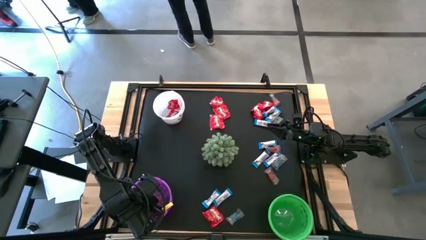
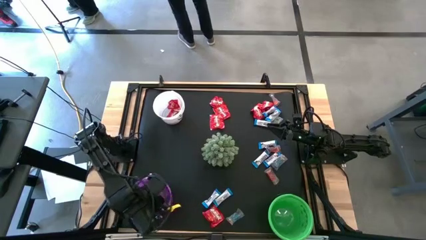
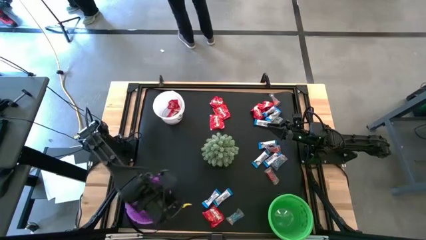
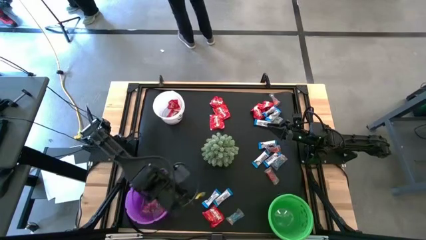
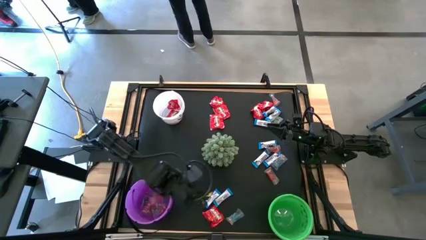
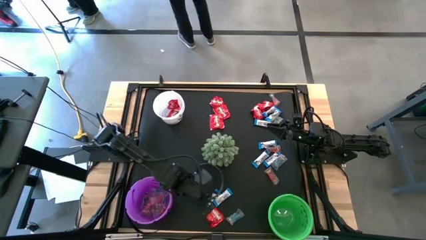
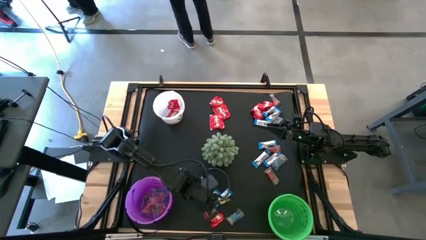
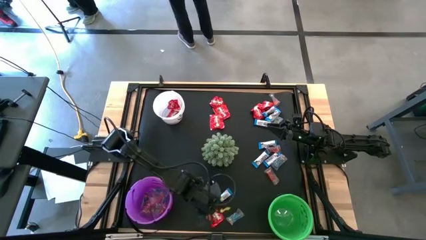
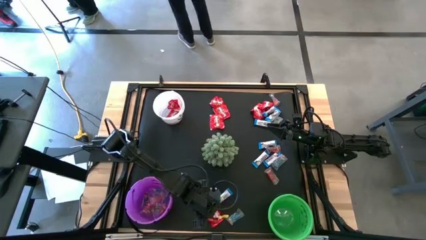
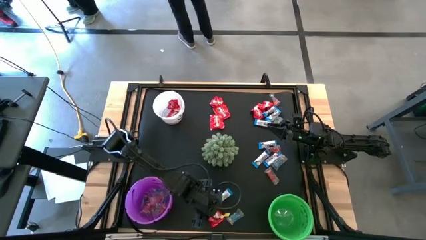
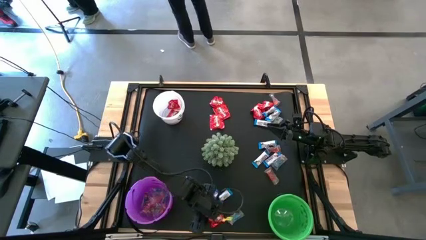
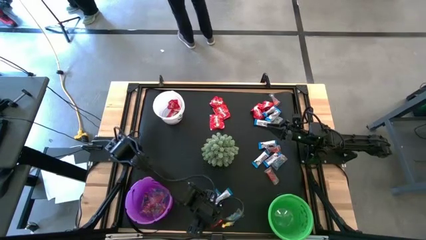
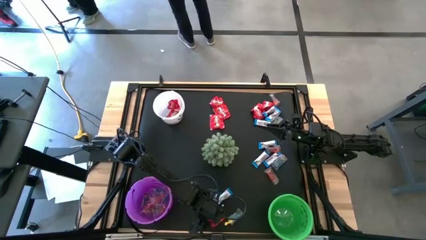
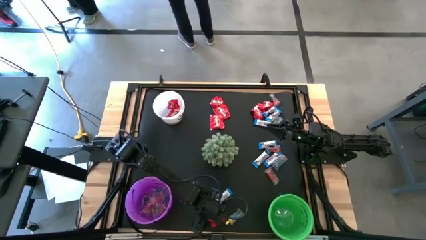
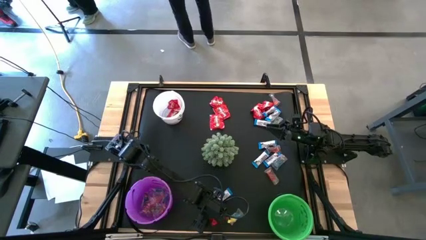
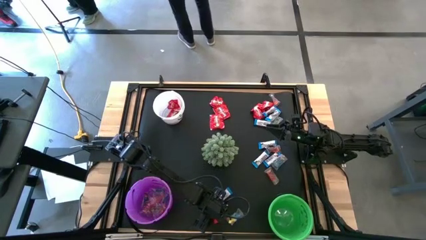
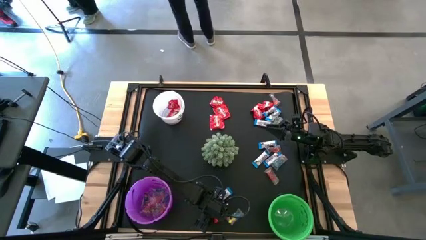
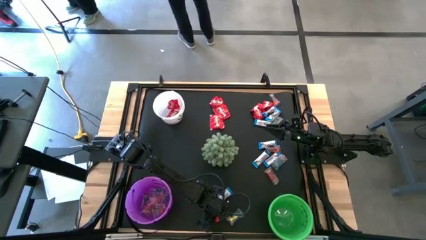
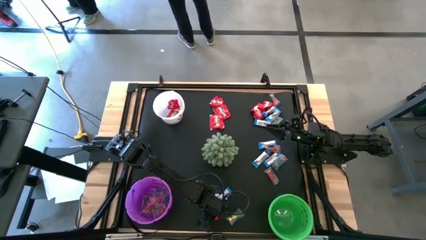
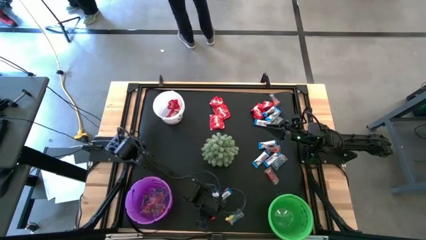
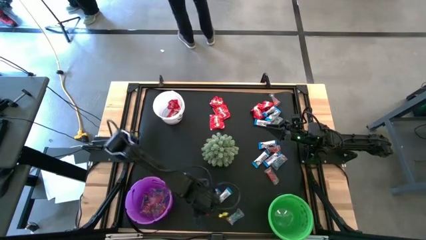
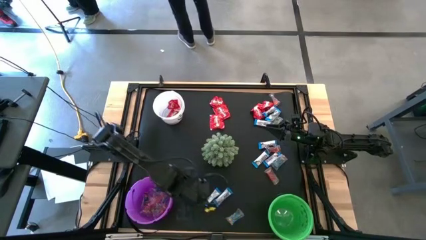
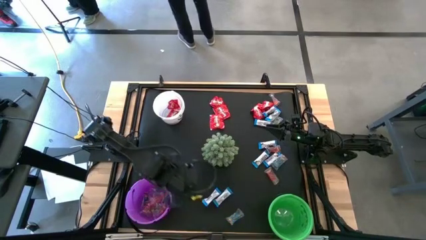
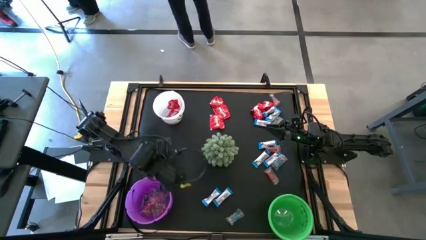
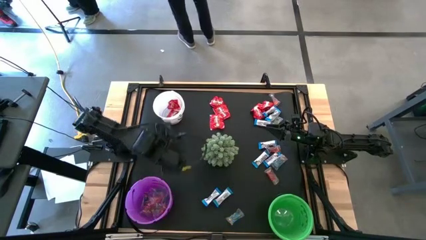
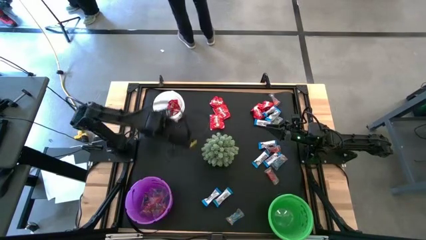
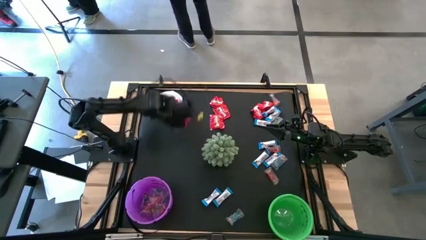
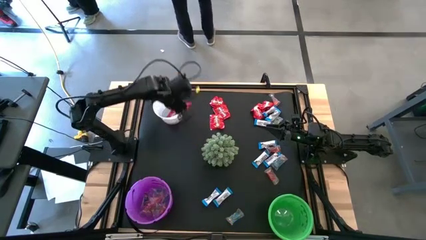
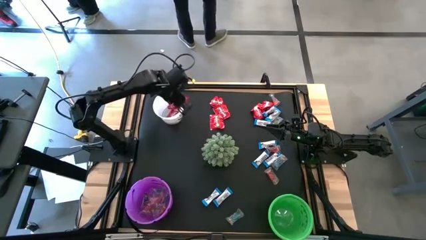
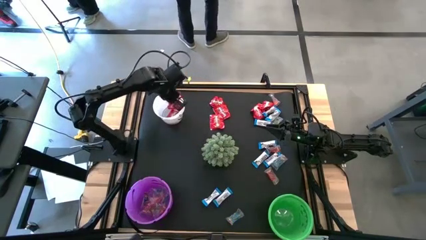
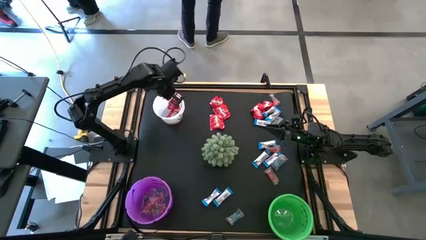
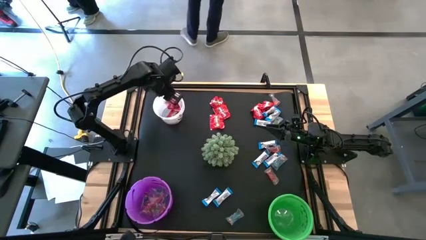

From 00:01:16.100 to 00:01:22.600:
Task: Organize candy in baskets
Put the red candy into the white bucket

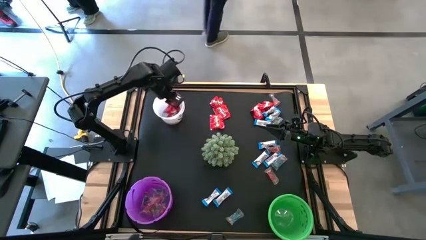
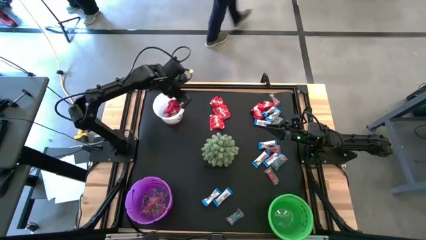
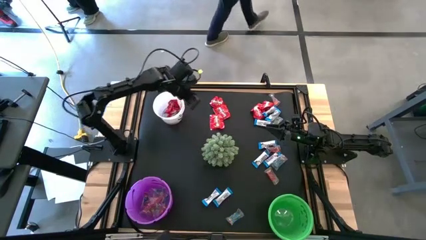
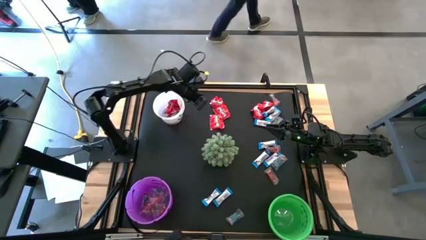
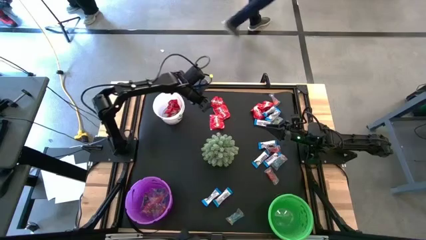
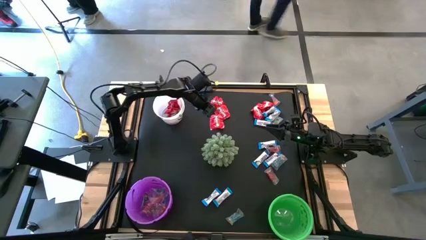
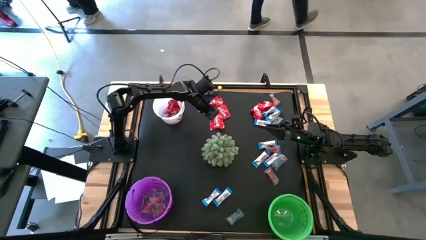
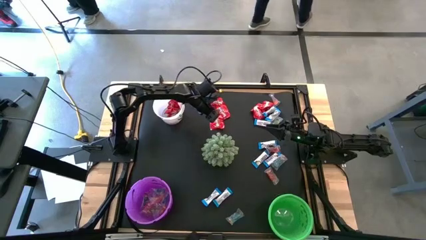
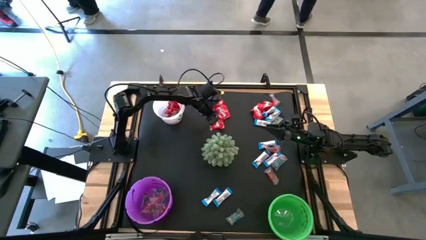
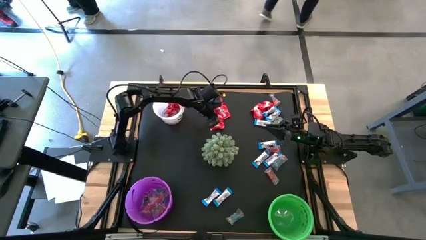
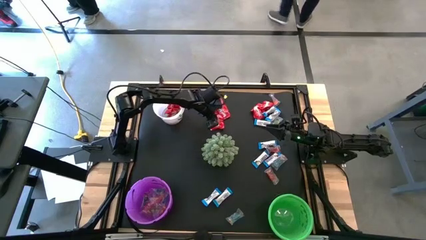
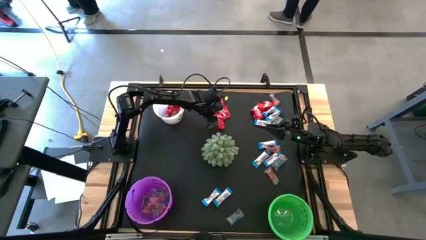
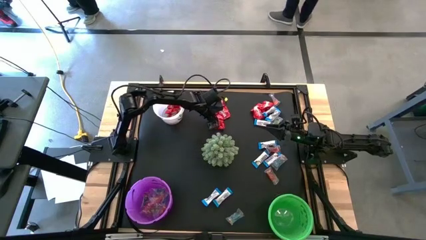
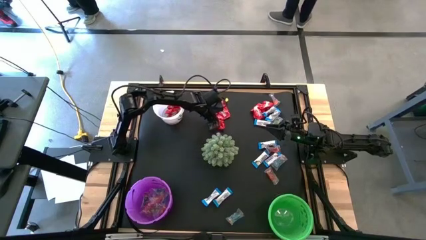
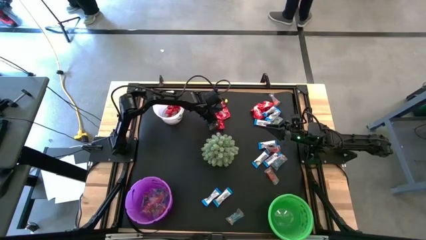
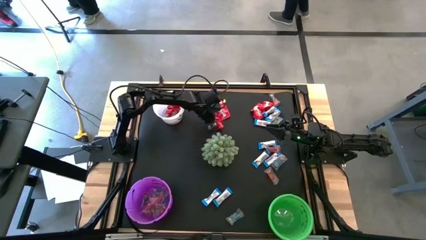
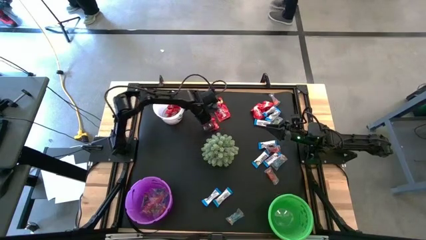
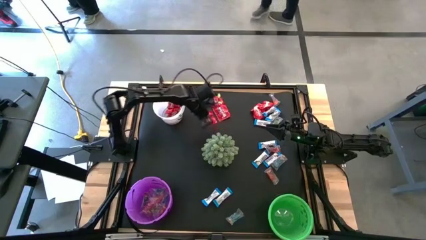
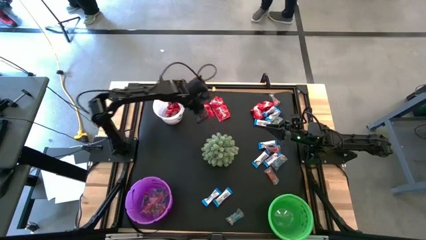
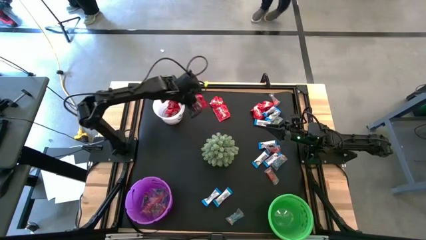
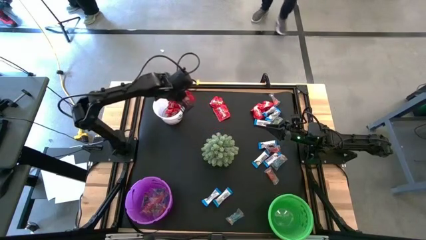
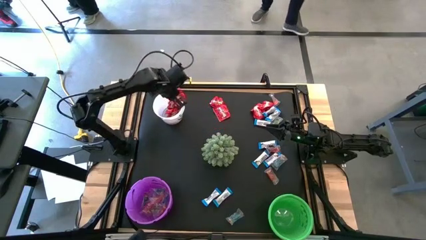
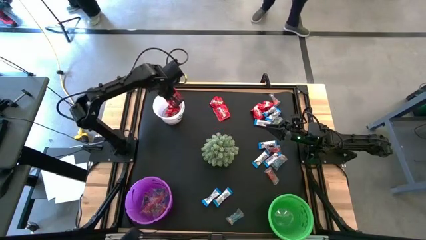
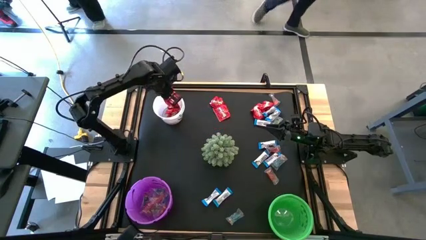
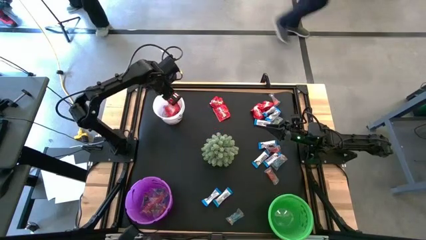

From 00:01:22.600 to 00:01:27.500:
Put the red candy into the white bucket

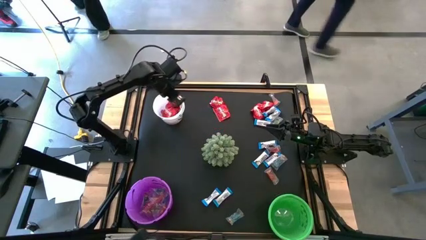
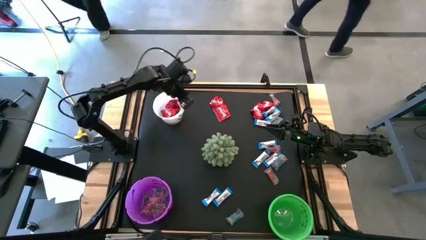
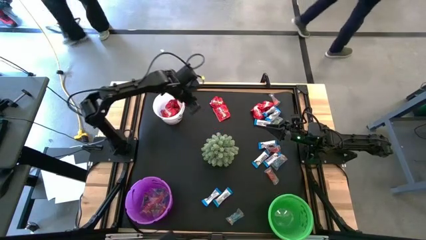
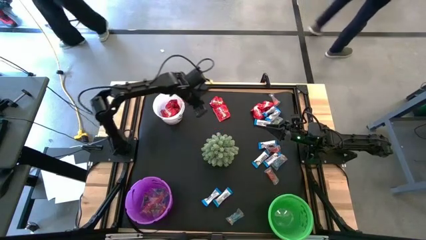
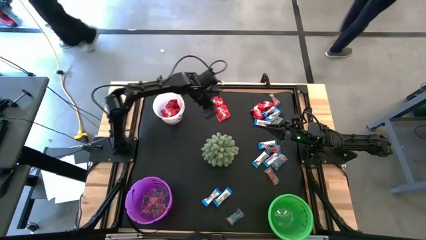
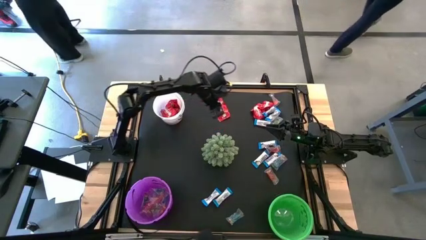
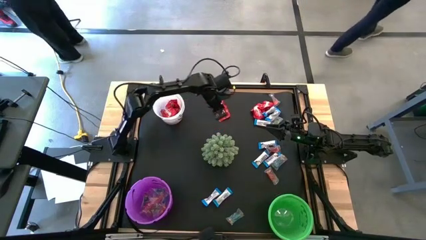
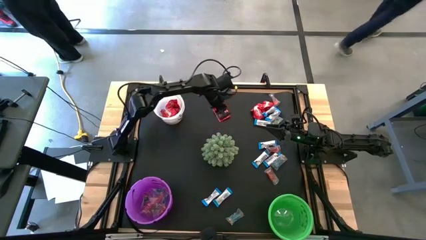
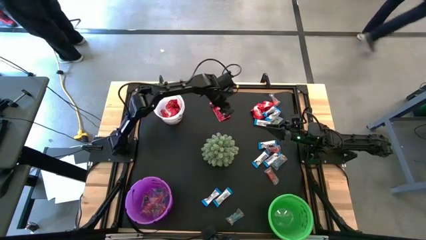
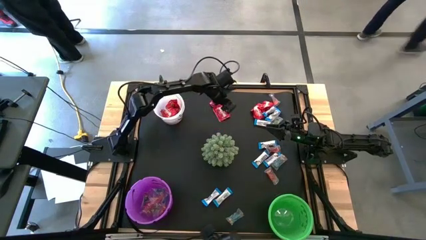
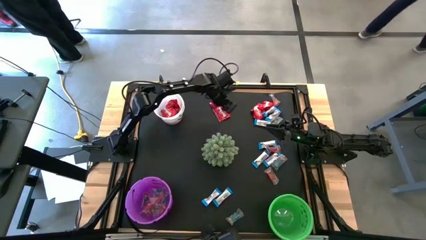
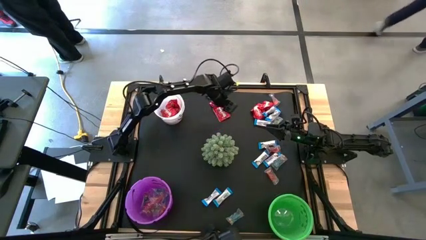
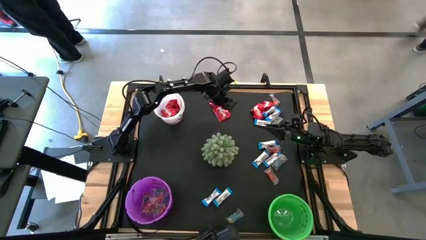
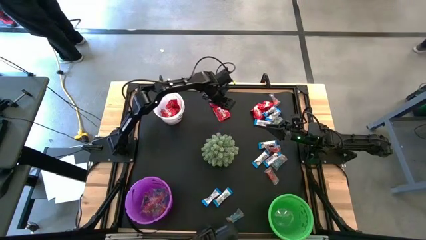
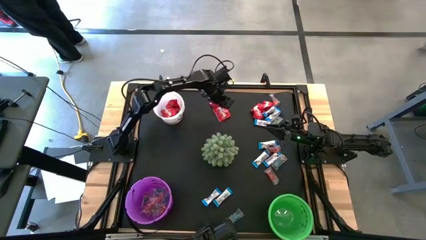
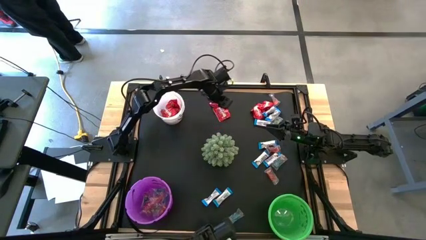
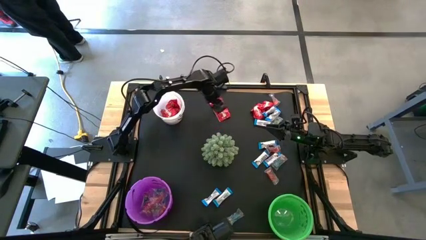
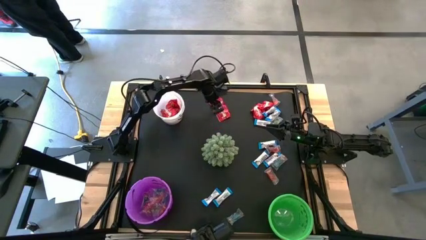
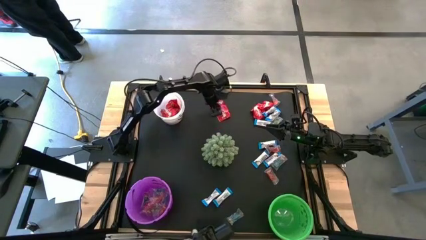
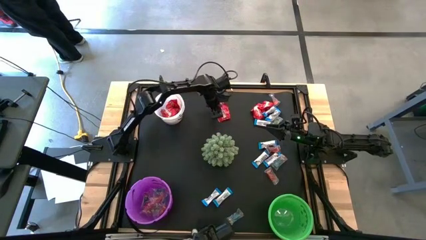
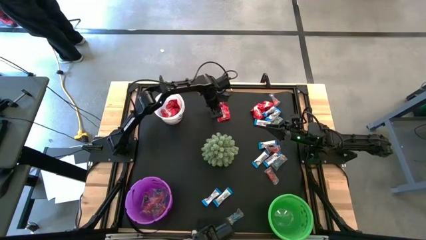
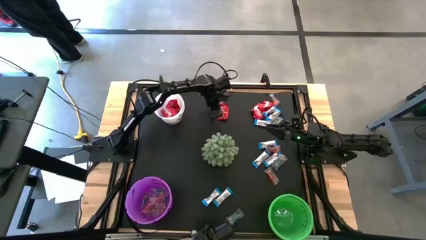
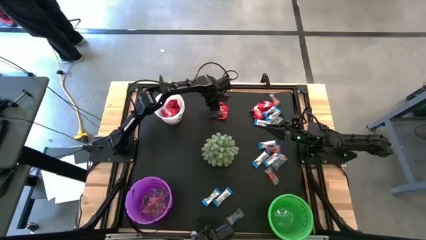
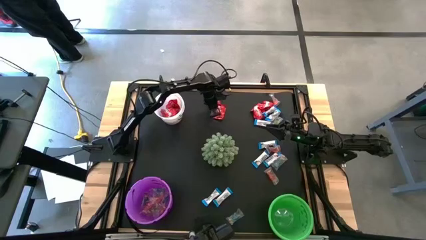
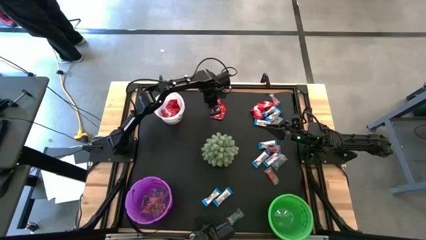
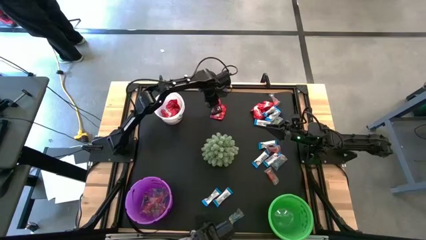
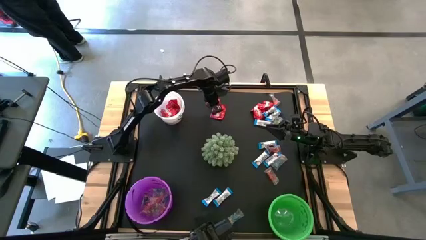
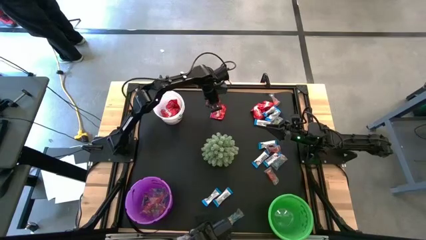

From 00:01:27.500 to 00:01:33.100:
Put the red candy into the white bucket
